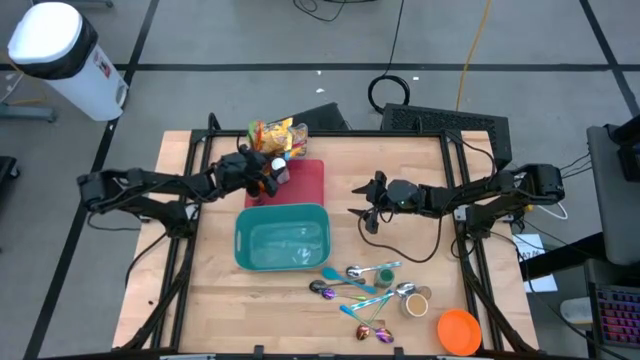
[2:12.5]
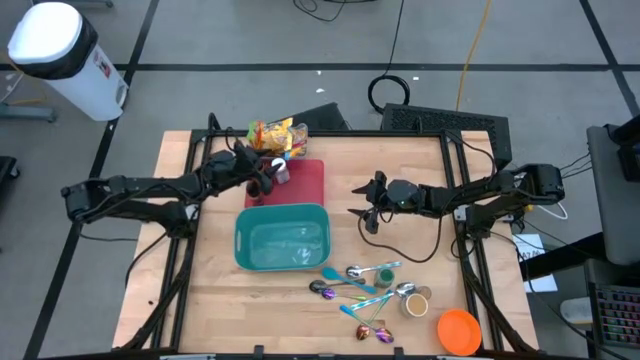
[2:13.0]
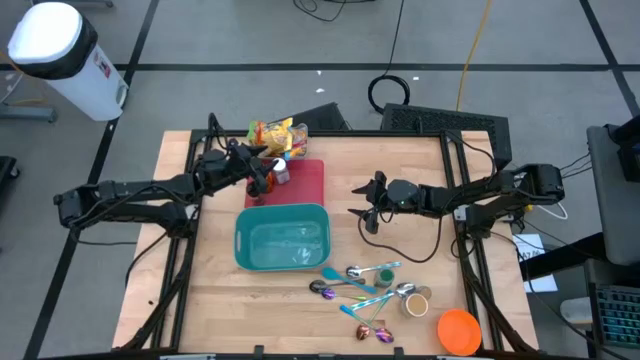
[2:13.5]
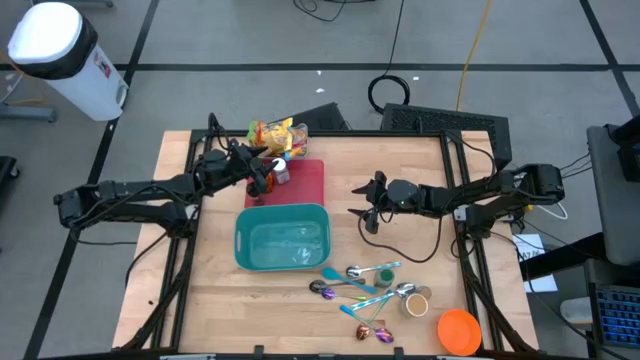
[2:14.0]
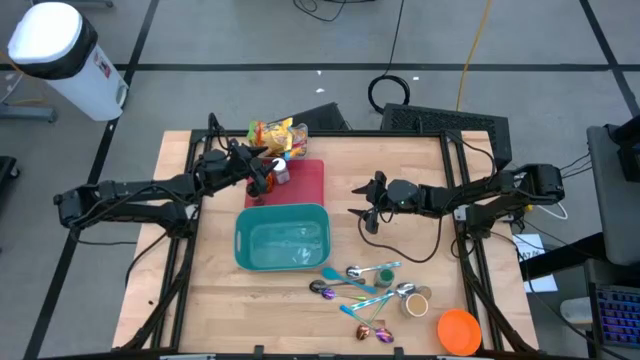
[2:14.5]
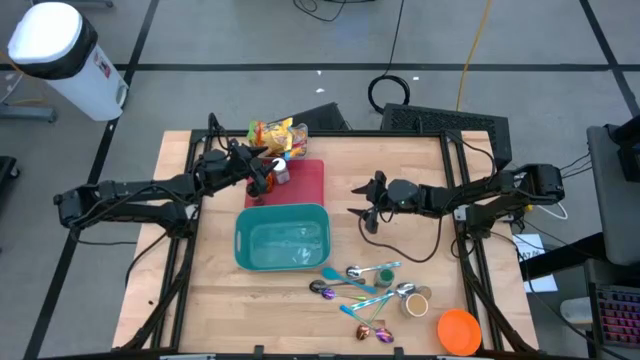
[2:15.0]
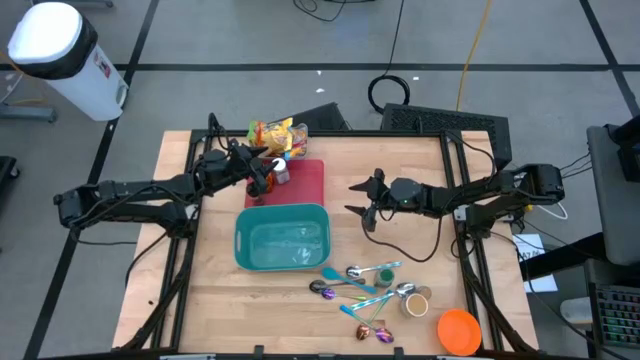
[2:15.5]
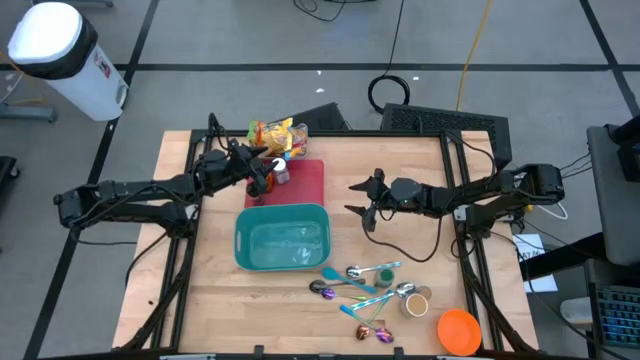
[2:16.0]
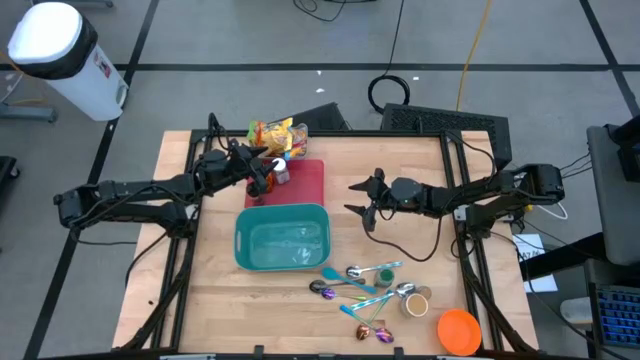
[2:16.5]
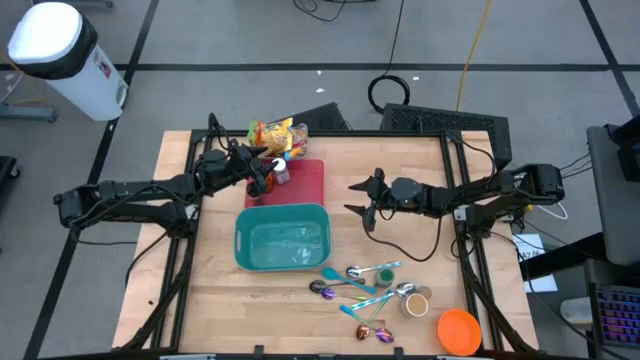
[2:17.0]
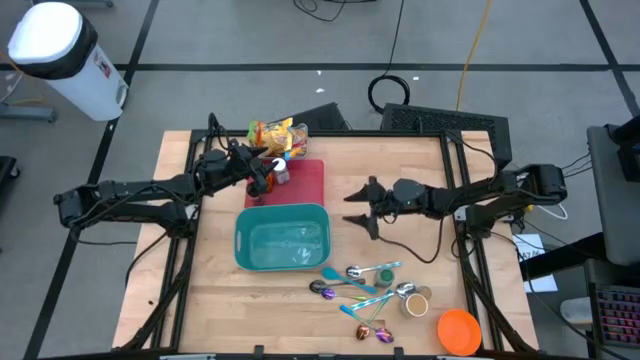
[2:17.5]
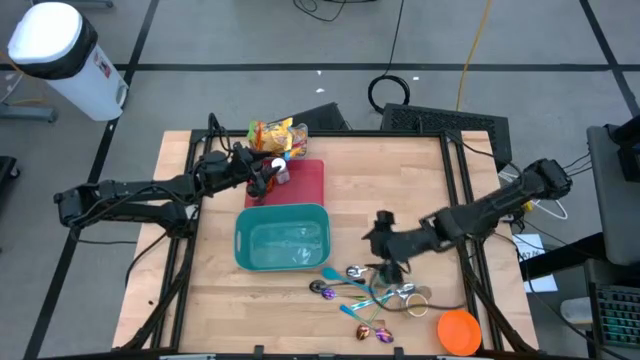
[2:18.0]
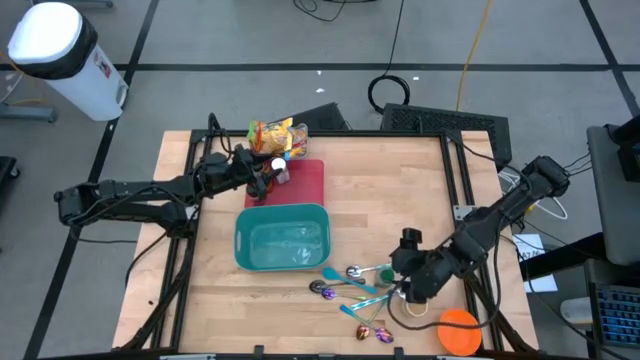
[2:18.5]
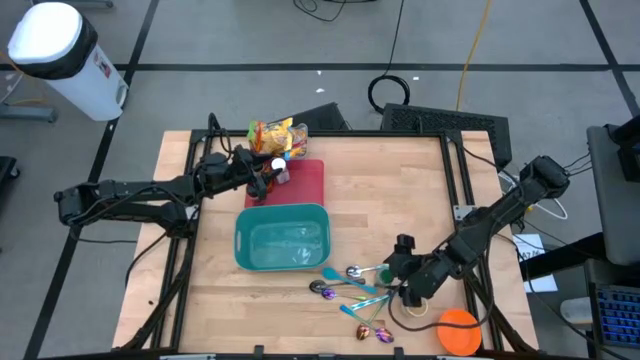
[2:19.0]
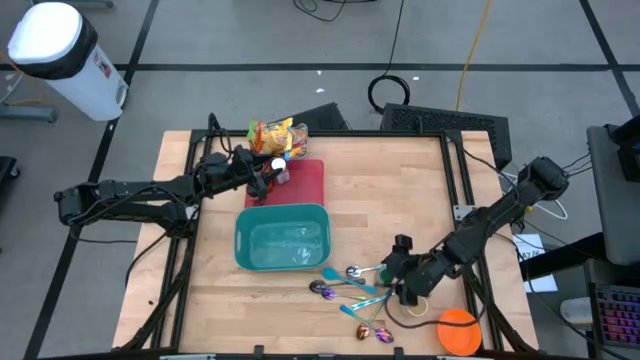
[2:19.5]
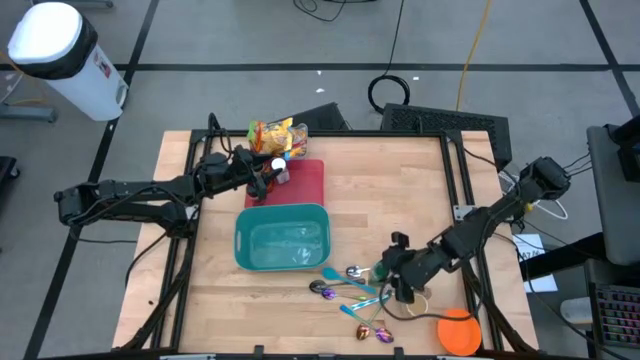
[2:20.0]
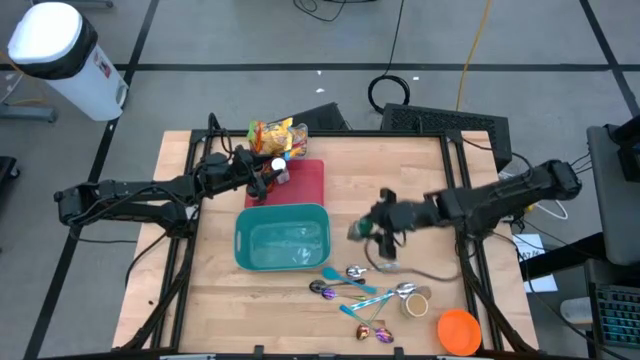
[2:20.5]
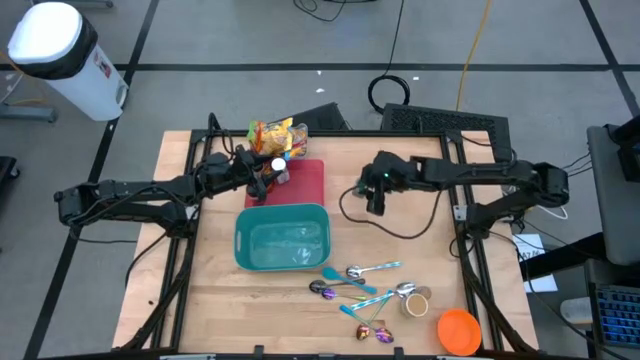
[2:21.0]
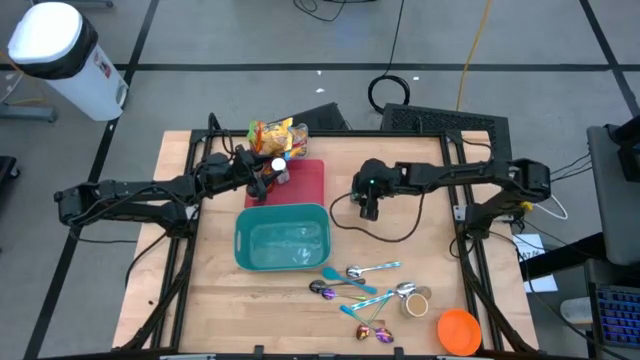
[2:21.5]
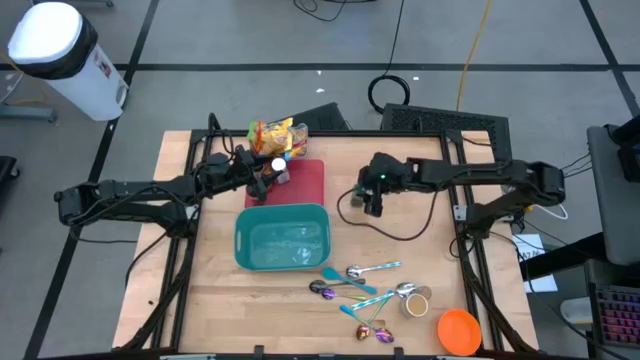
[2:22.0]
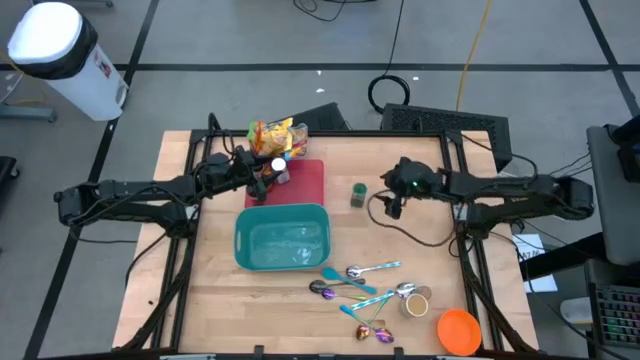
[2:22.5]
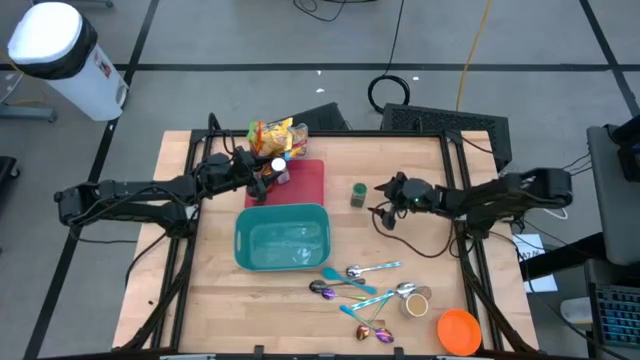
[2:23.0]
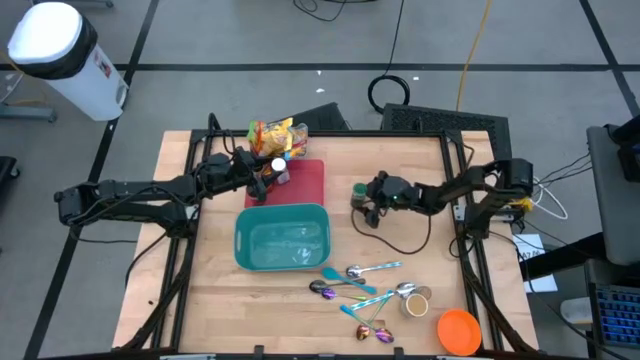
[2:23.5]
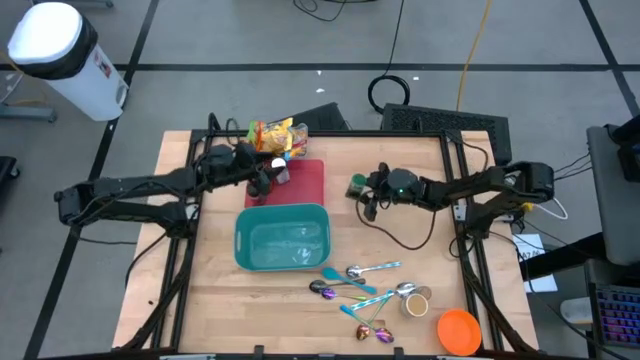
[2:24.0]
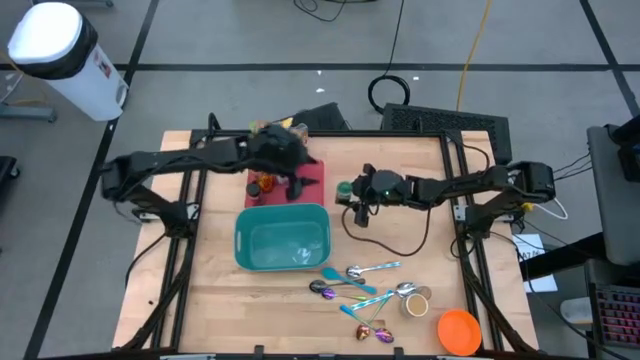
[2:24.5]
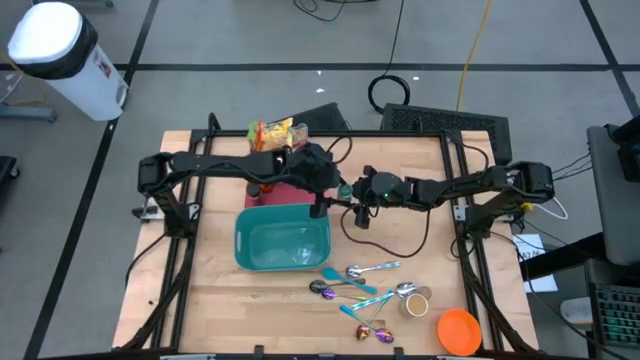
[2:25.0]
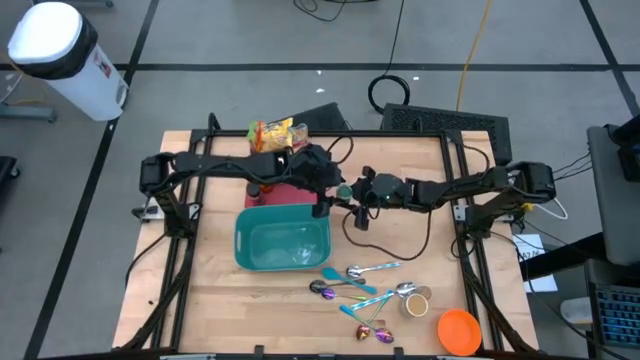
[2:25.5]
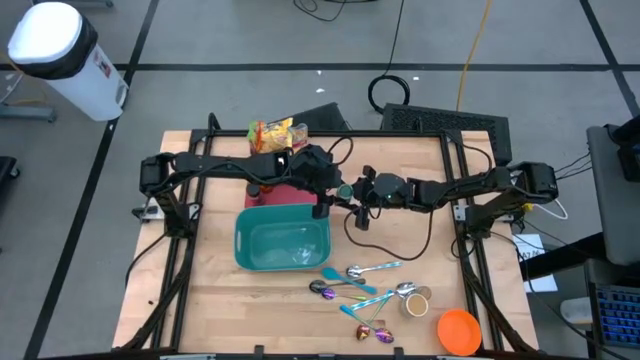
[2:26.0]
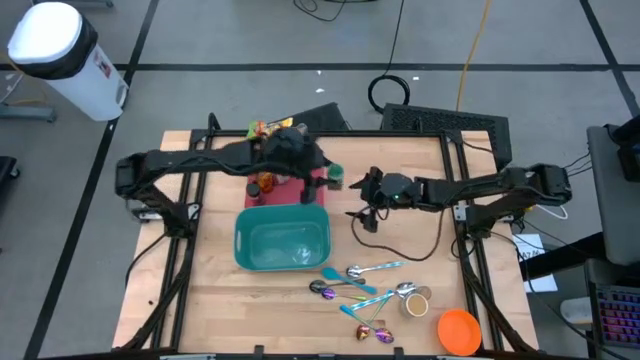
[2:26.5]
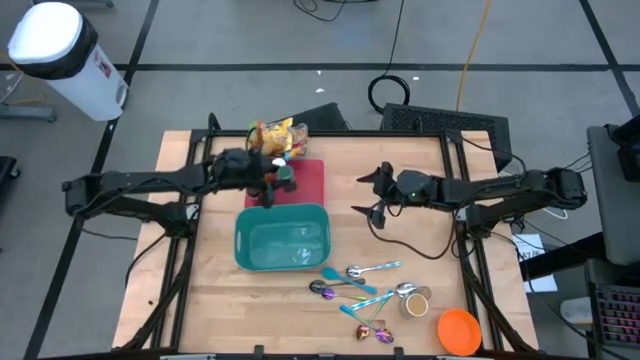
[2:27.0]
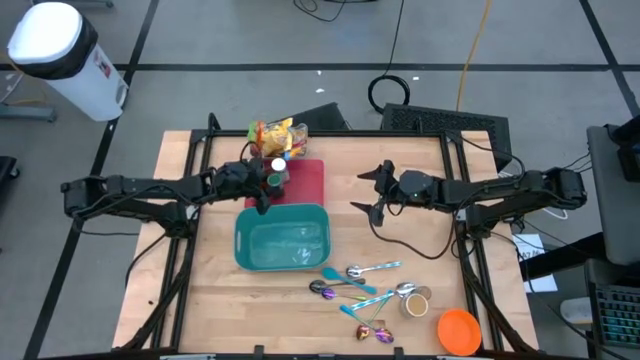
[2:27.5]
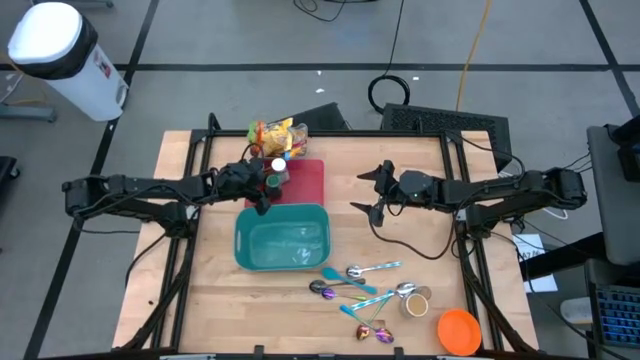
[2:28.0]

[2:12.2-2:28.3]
Task: Pick & Place Food Item
Put the green seasoning bottle into the red bin

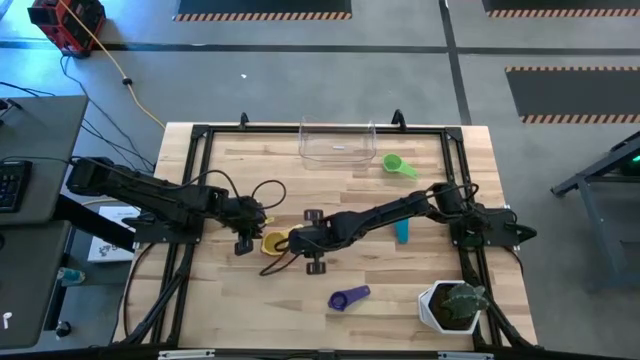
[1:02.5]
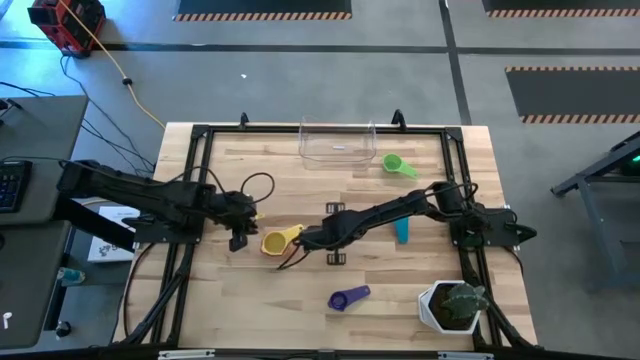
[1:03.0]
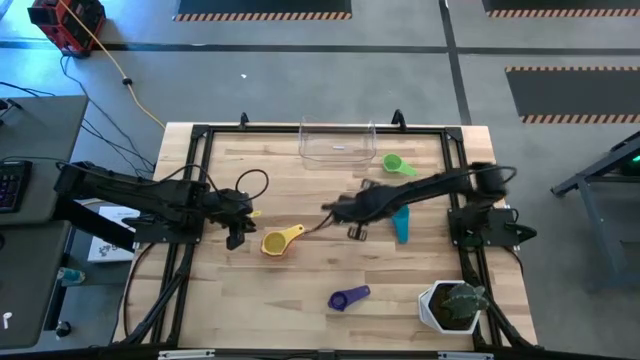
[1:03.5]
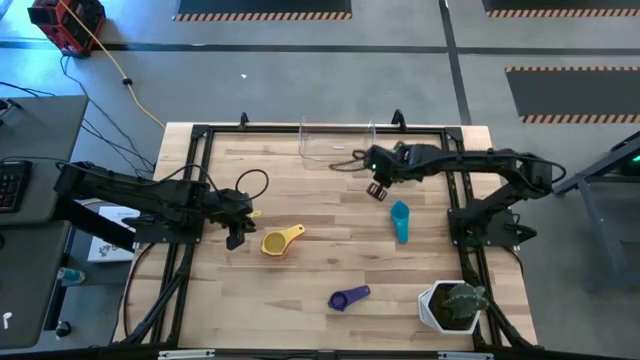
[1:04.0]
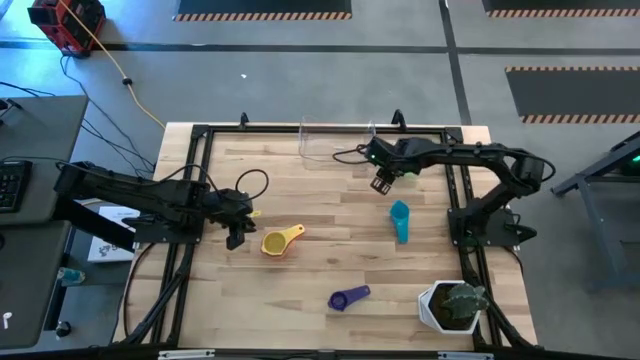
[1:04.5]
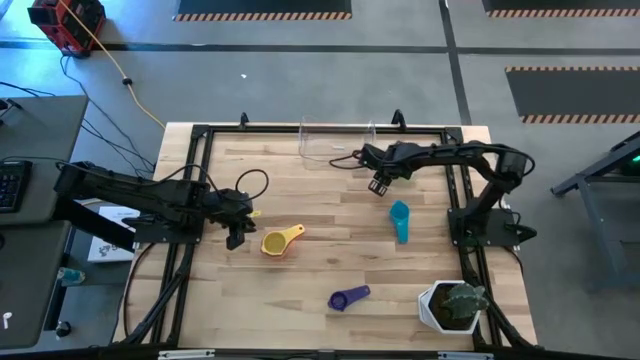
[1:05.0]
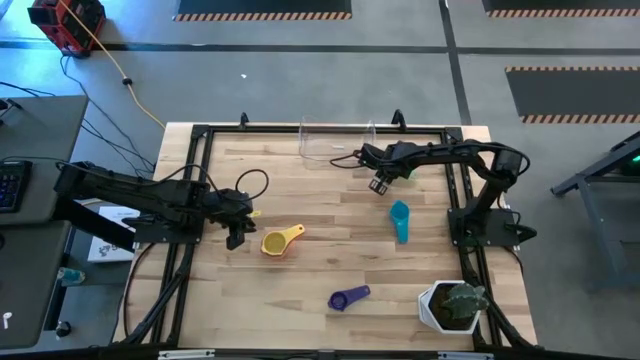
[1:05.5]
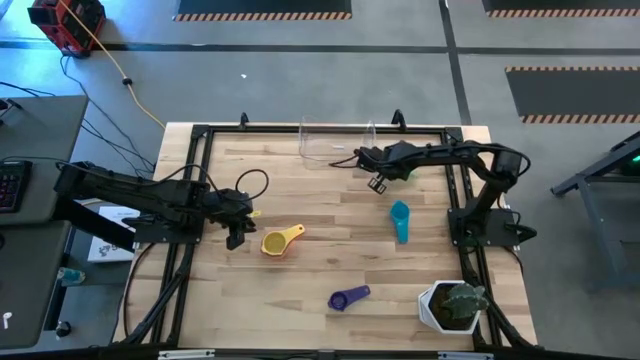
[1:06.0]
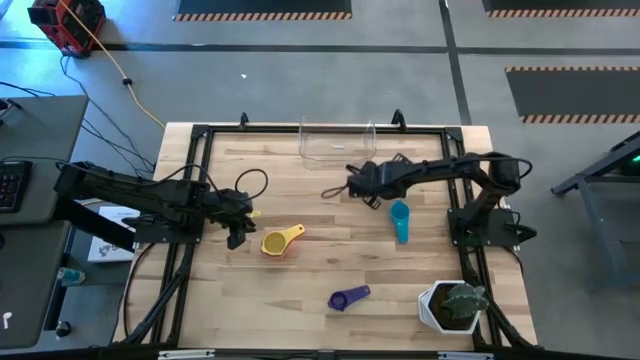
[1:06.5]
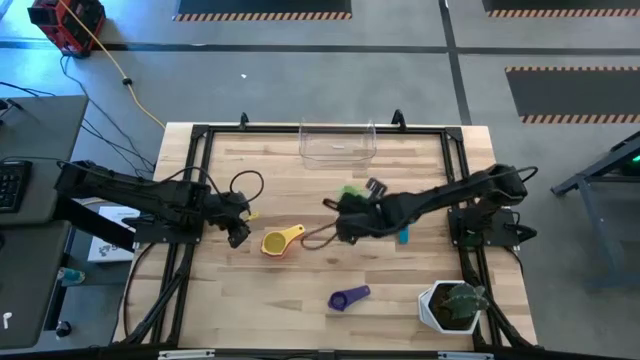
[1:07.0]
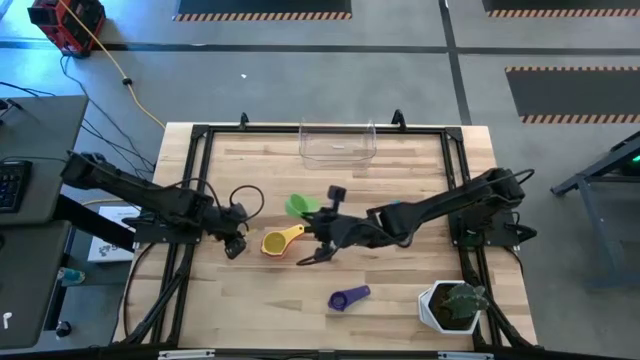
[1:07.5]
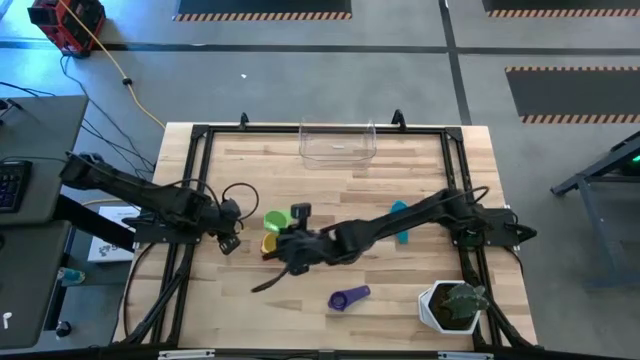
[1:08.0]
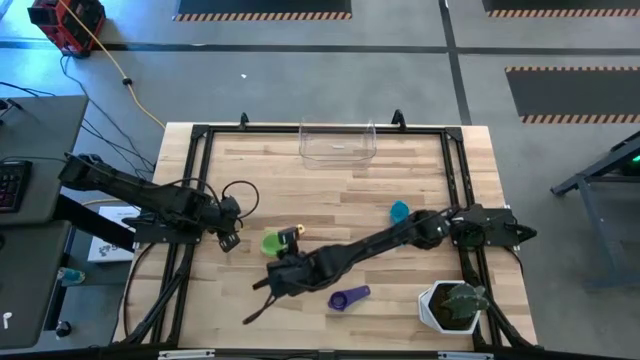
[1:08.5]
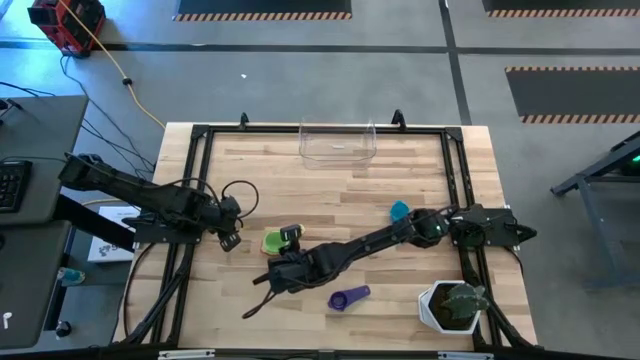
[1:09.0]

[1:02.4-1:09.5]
Task: Nest measuring cups in basket
Stack the green measuring cup into the yellow measuring cup
